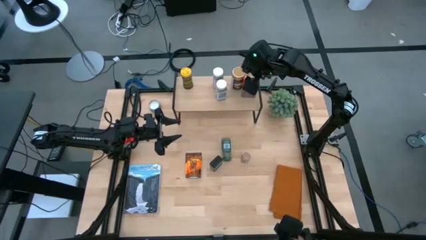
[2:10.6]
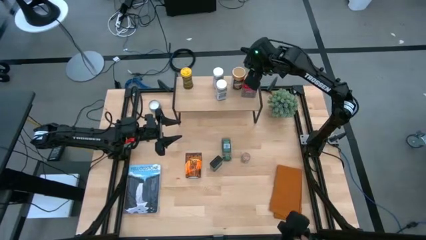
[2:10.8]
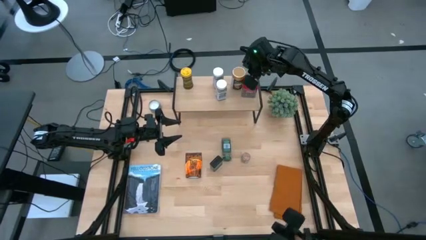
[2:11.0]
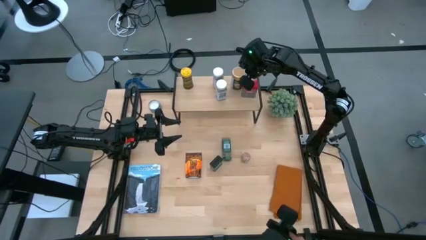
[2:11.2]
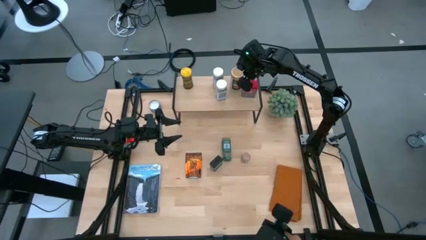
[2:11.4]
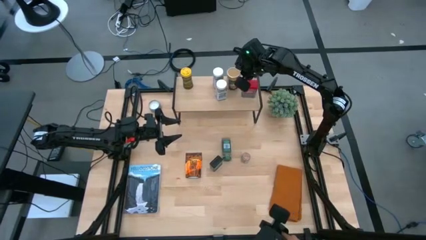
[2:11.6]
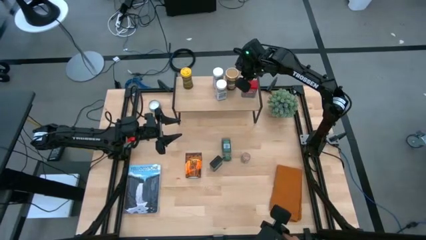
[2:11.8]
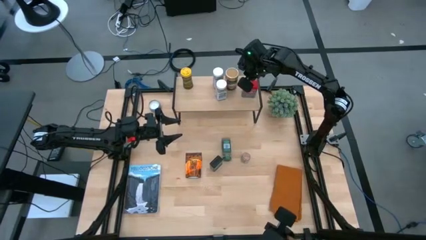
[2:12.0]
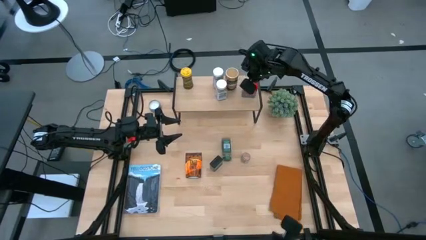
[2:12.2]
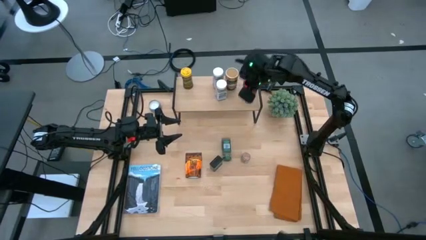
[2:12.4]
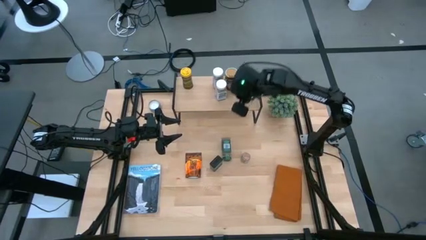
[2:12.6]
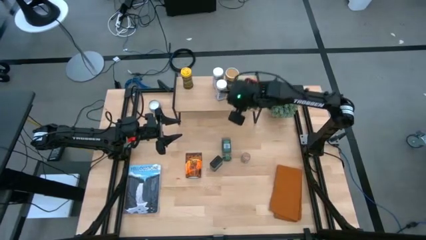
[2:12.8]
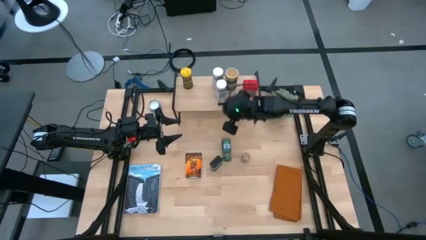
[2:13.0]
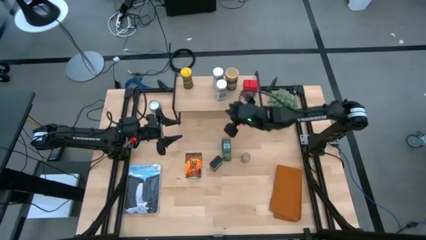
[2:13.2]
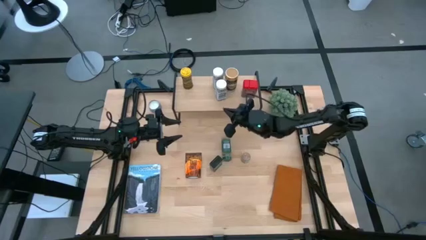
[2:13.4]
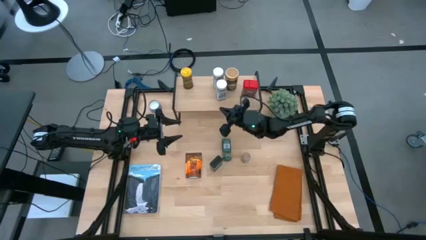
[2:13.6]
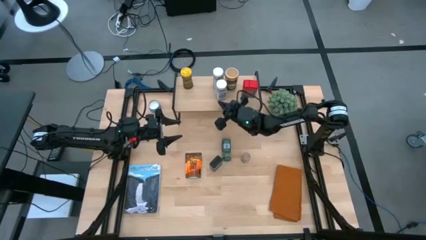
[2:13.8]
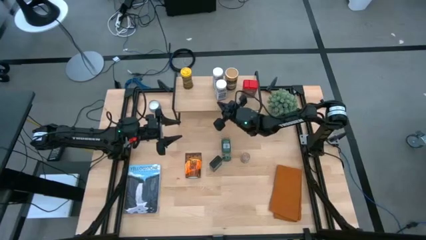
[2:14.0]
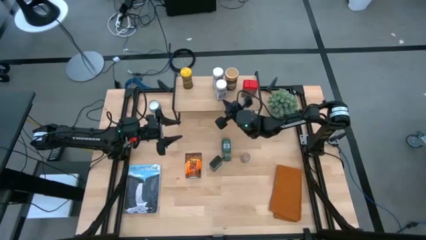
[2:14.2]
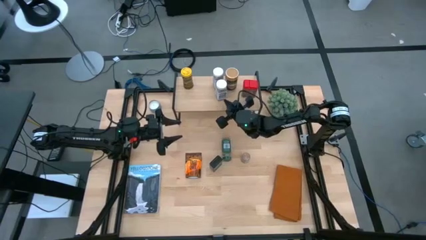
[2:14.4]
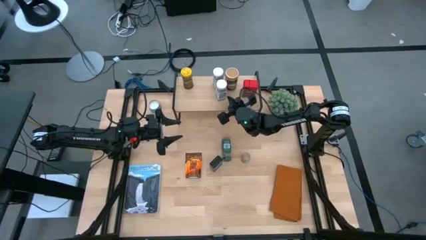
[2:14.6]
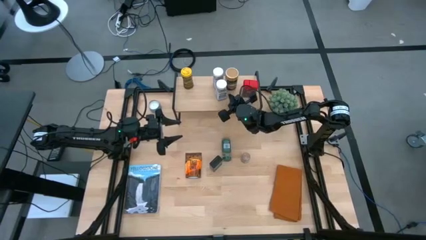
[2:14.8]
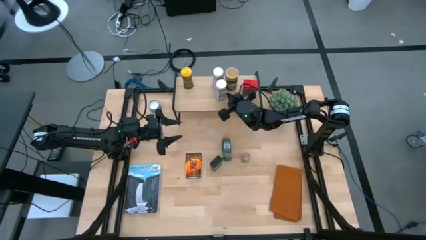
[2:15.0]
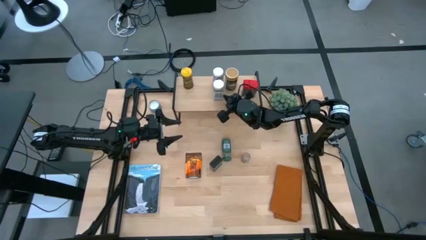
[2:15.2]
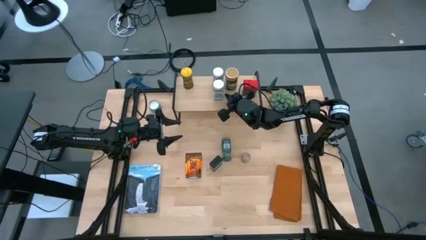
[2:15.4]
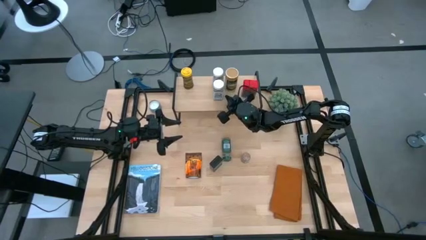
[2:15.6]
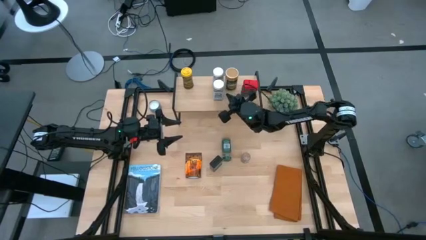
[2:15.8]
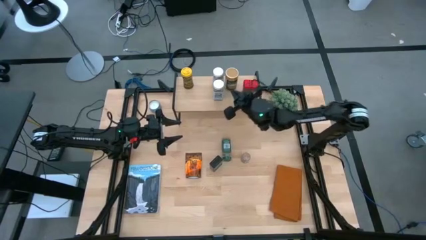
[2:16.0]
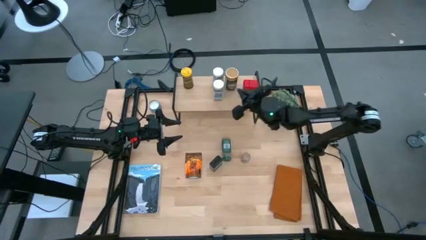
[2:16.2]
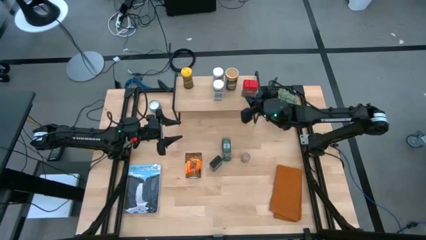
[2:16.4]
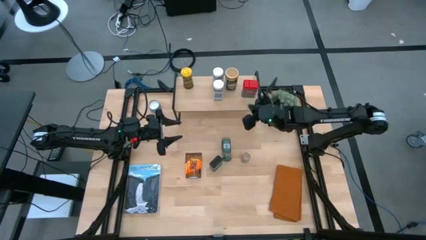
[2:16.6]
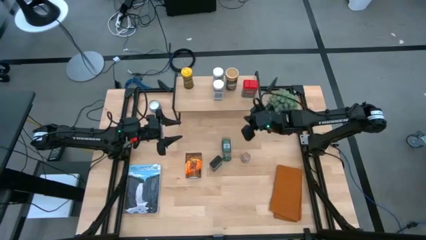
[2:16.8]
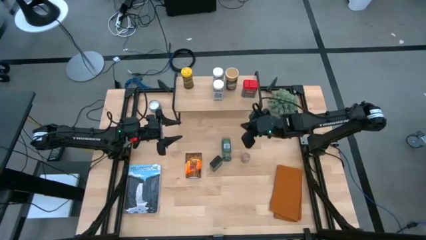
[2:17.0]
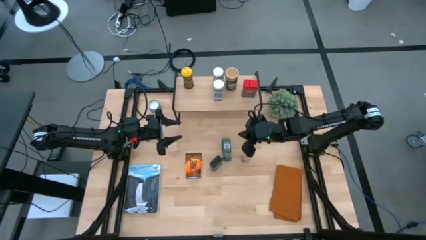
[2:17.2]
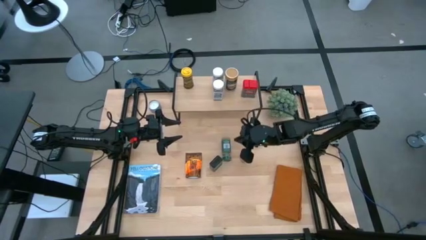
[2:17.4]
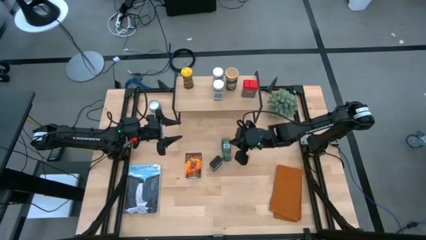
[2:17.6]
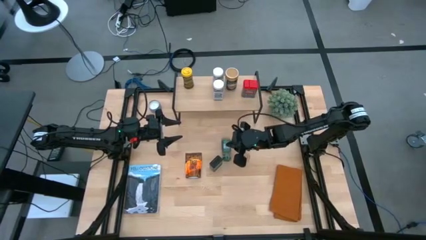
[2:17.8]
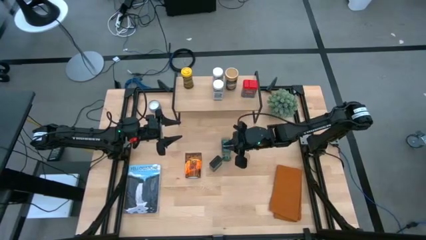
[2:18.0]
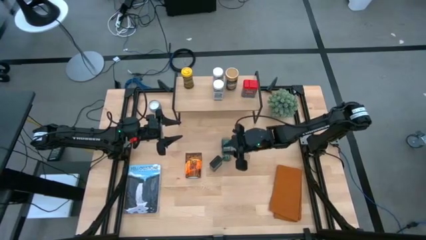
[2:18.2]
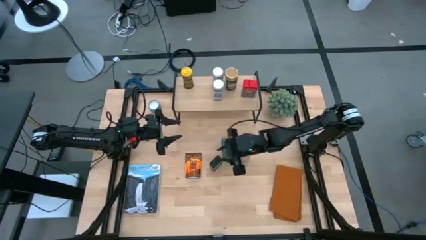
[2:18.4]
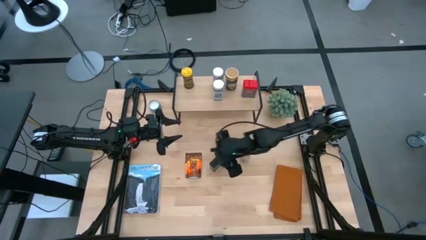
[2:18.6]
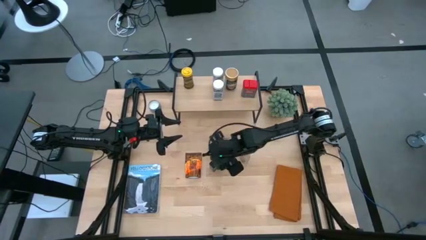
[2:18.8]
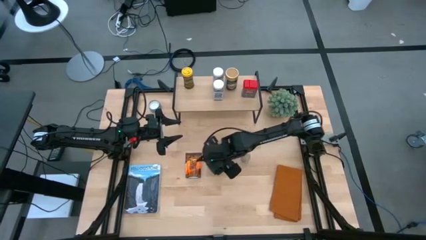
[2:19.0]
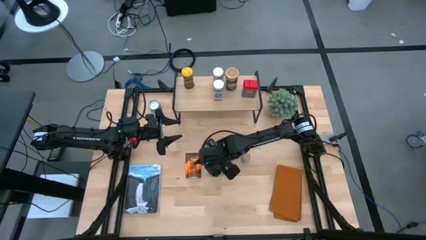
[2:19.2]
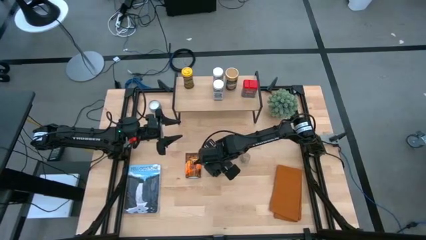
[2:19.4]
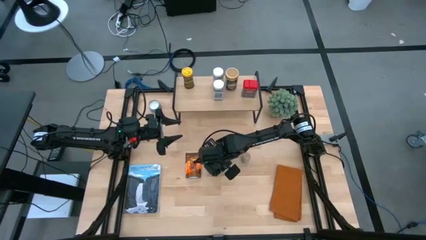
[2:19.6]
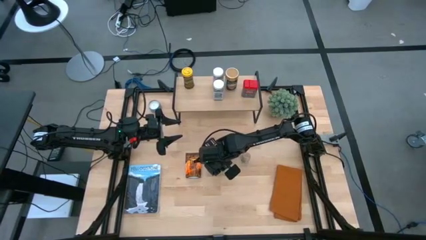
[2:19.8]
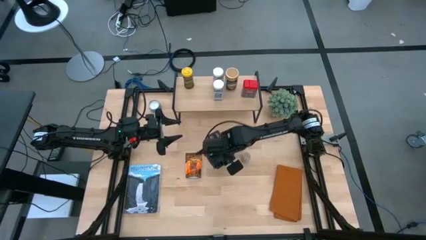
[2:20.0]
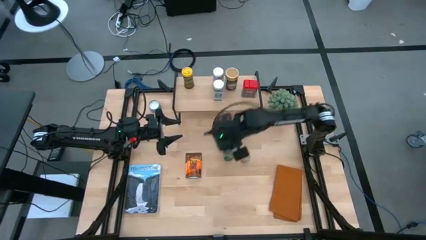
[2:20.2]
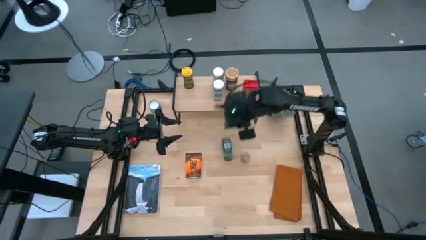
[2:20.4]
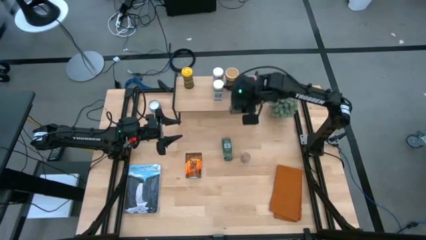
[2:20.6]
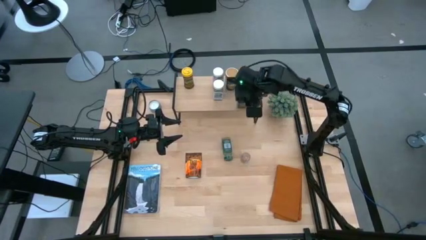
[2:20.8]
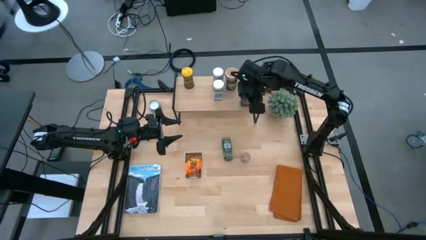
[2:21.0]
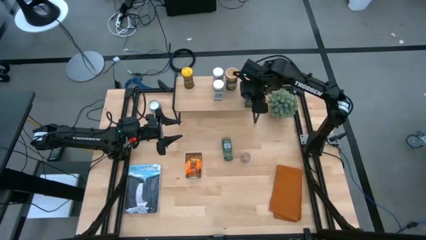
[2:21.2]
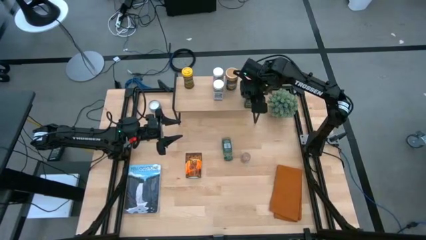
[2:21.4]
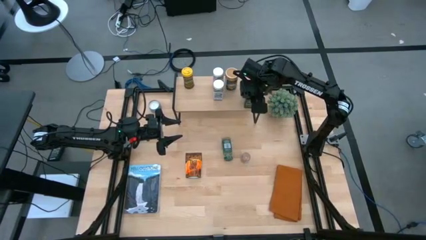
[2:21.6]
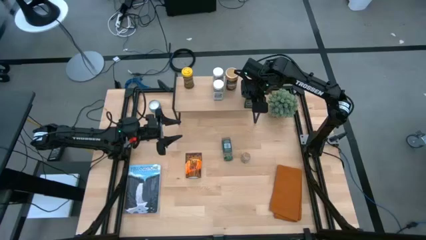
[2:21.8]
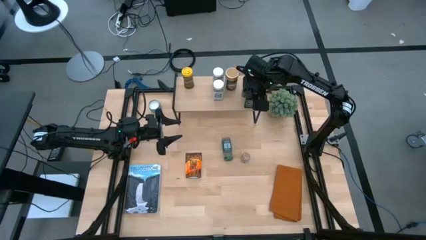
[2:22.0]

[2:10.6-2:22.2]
Task: Shelf spices
Put the black can seasoning on the shelf

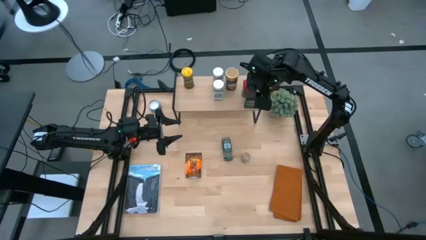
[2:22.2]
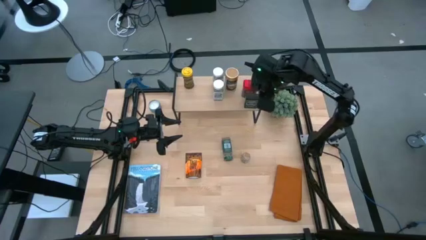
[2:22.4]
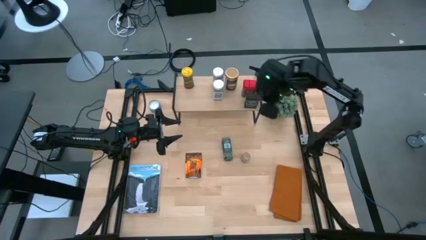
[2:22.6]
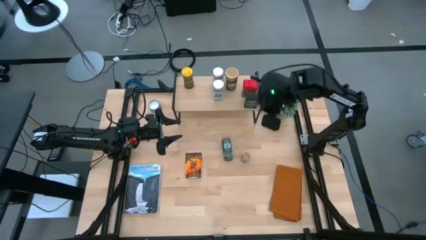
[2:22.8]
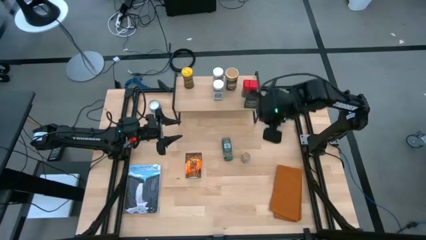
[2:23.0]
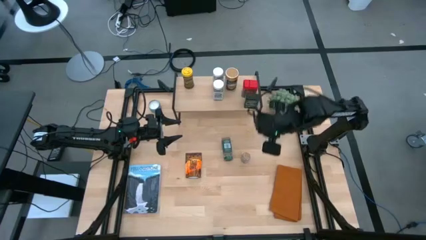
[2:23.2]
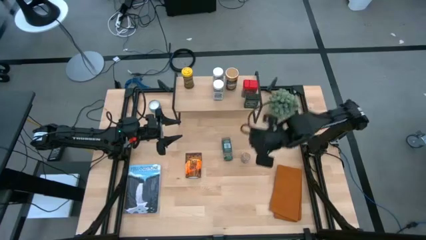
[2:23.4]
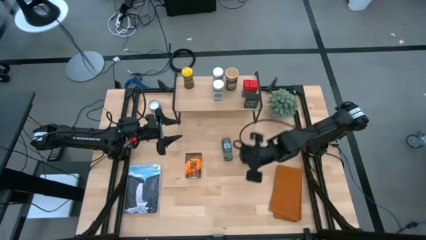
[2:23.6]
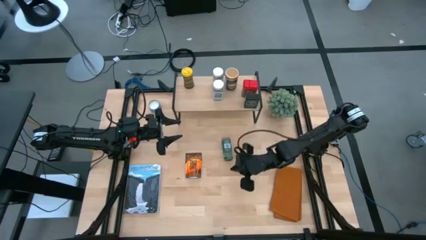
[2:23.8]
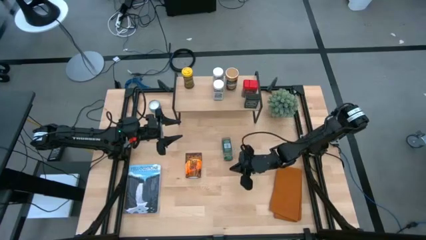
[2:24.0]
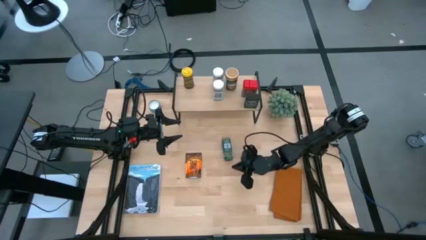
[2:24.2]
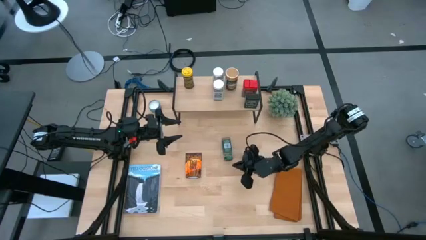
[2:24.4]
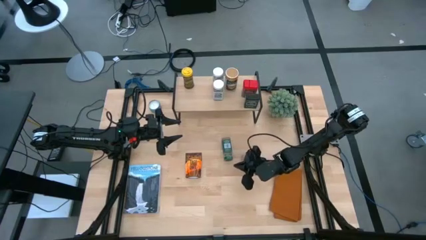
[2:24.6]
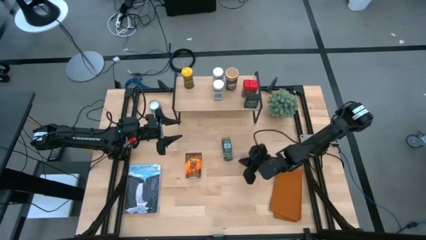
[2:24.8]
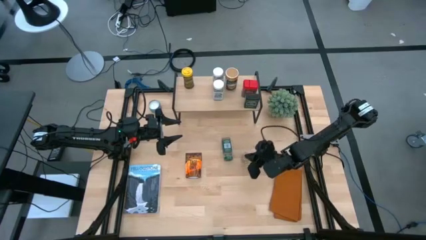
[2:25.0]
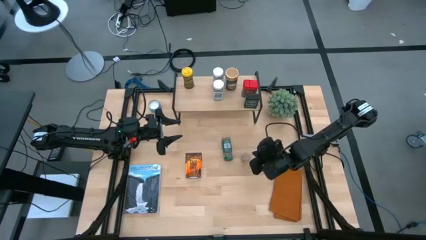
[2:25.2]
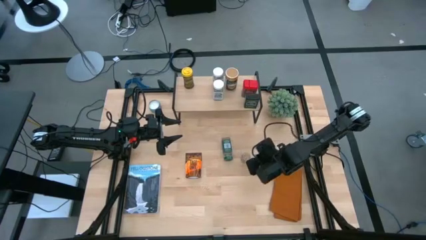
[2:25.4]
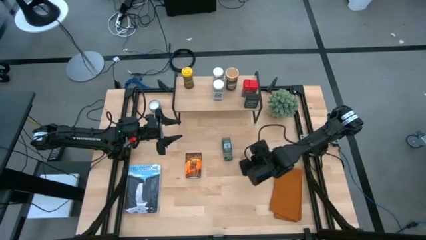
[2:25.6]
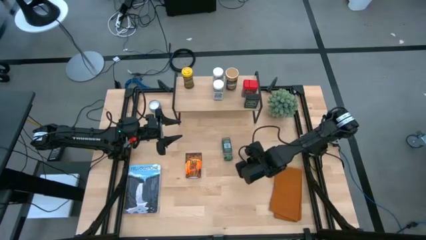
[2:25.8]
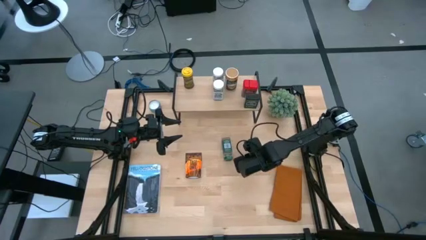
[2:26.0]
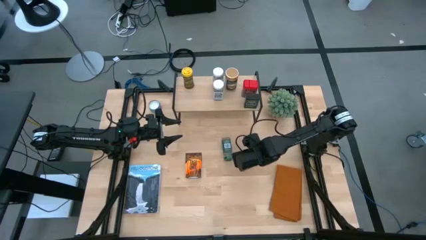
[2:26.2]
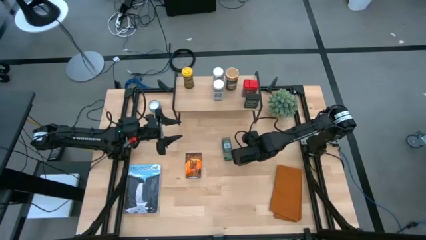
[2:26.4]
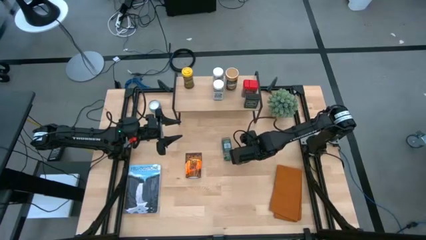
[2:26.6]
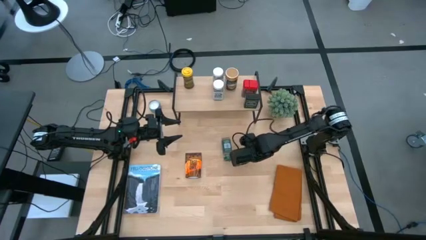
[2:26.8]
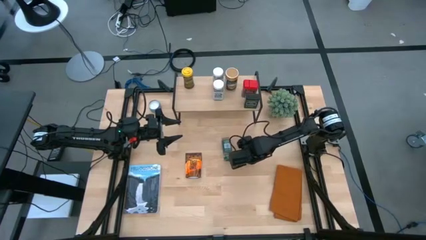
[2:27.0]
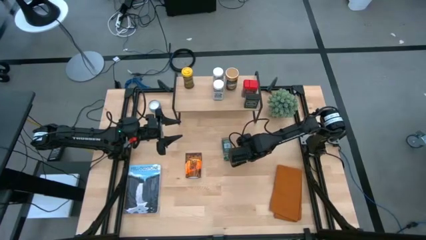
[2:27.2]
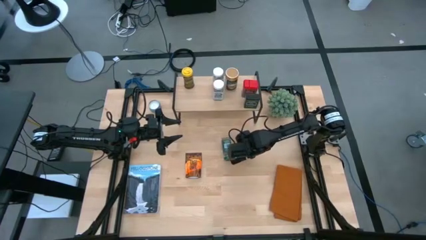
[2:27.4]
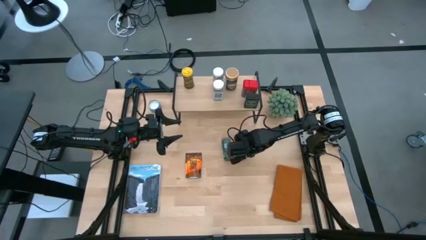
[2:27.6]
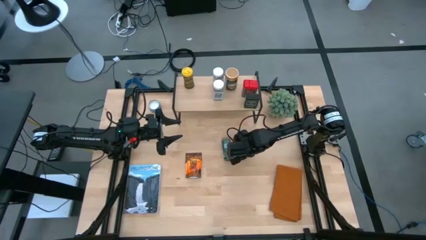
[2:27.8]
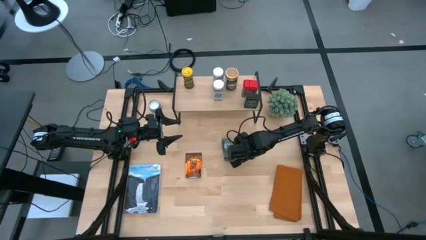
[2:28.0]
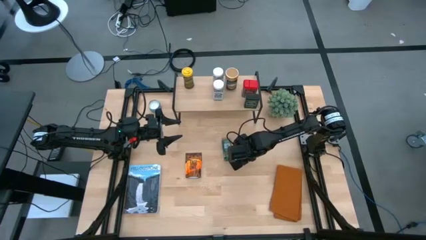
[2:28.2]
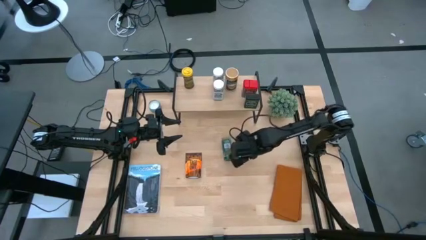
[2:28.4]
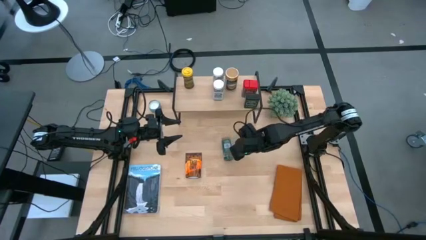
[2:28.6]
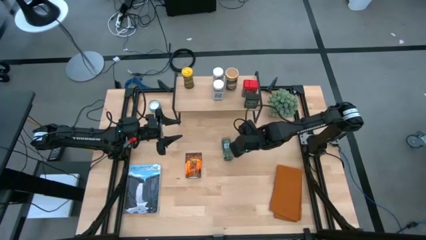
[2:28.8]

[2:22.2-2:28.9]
Put the brown bottle seasoning on the shelf
